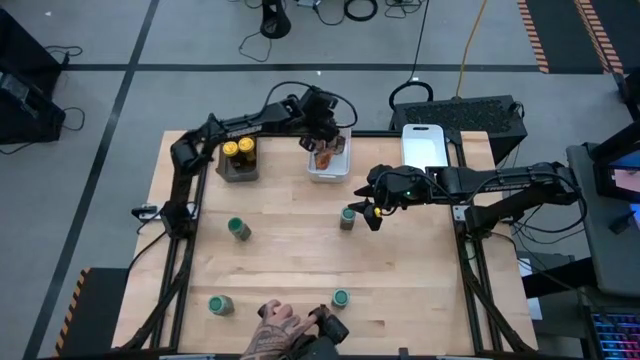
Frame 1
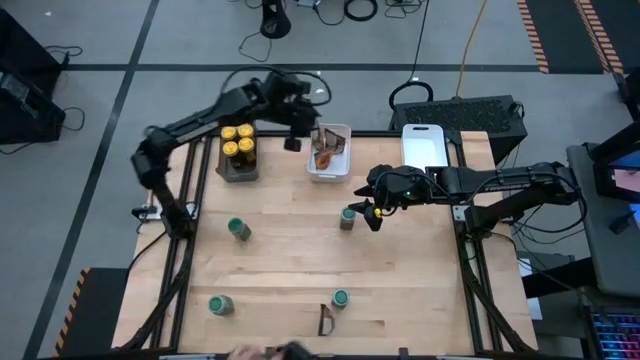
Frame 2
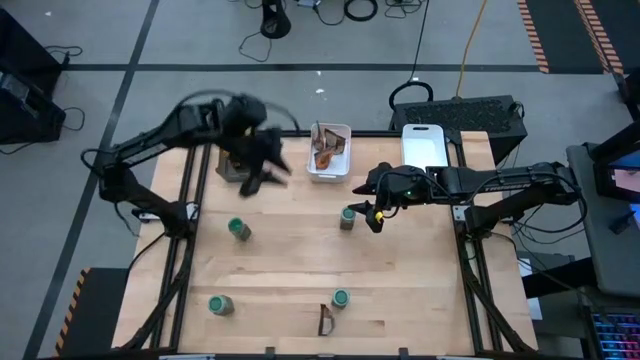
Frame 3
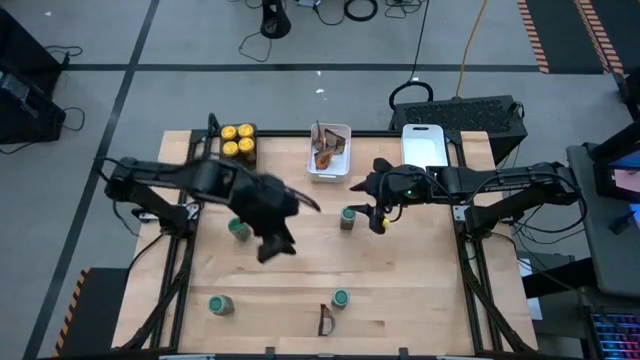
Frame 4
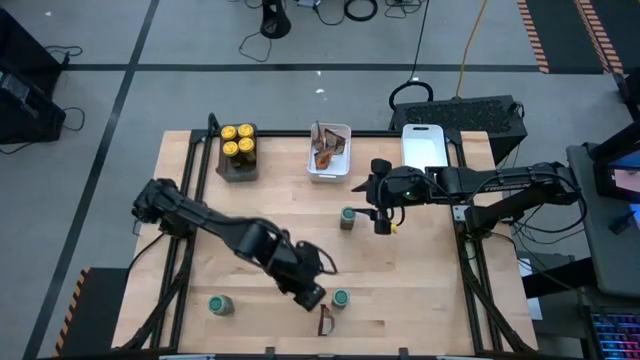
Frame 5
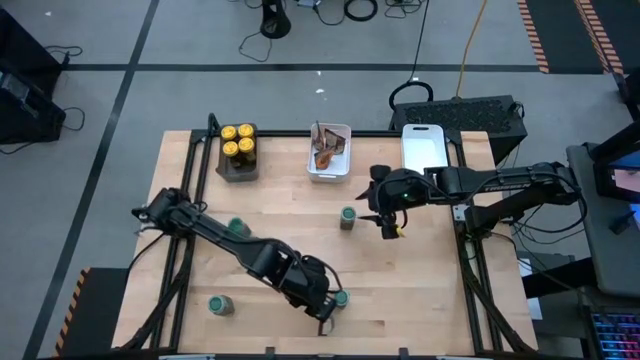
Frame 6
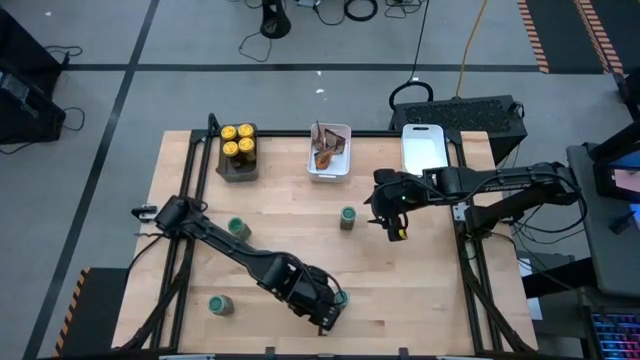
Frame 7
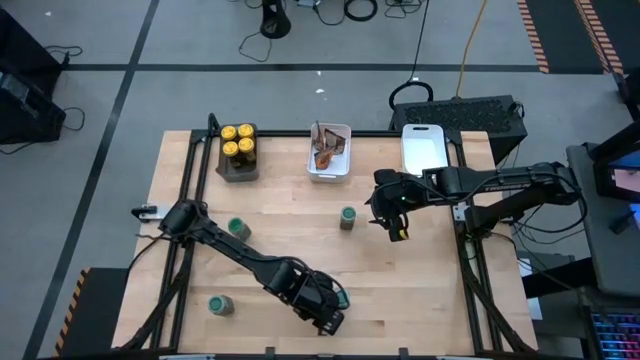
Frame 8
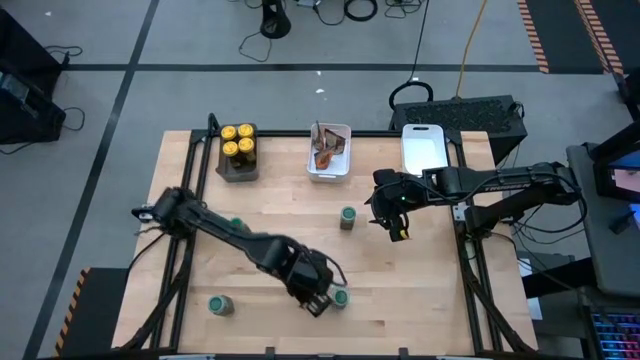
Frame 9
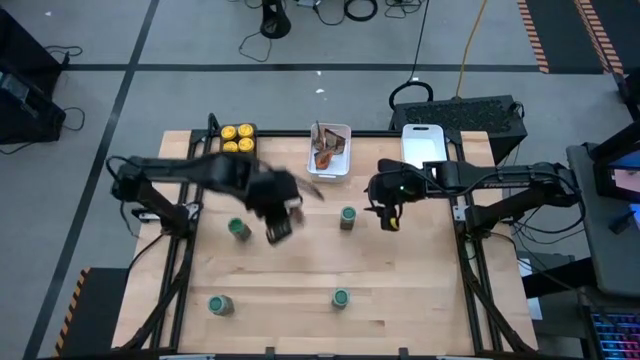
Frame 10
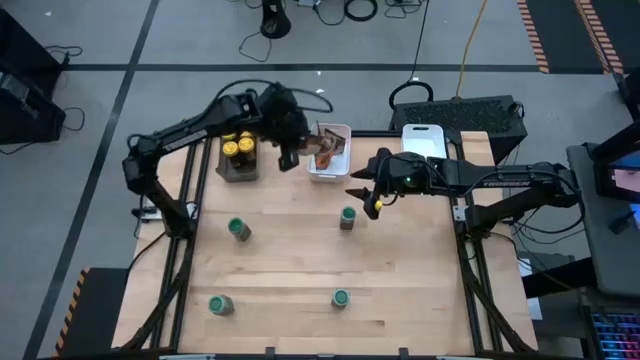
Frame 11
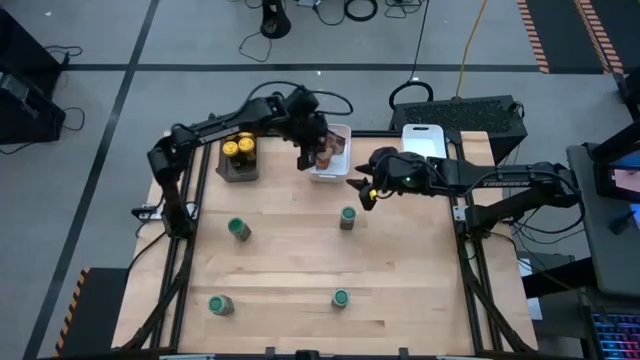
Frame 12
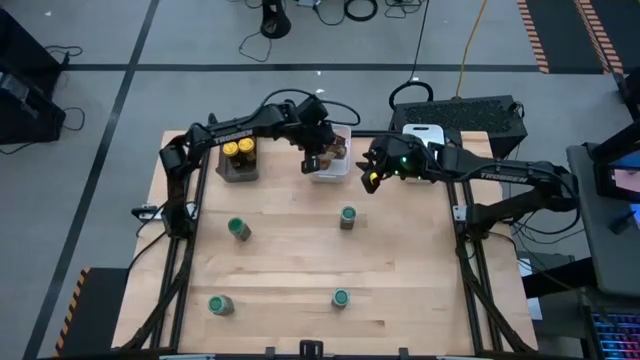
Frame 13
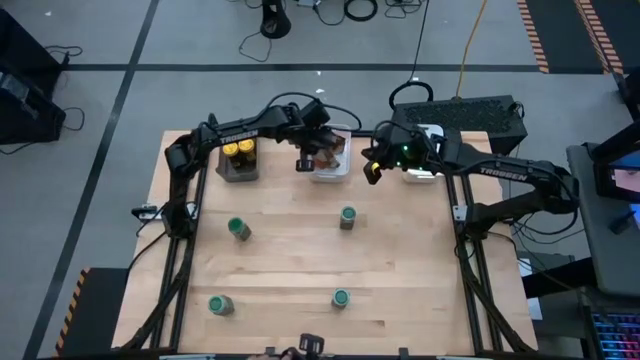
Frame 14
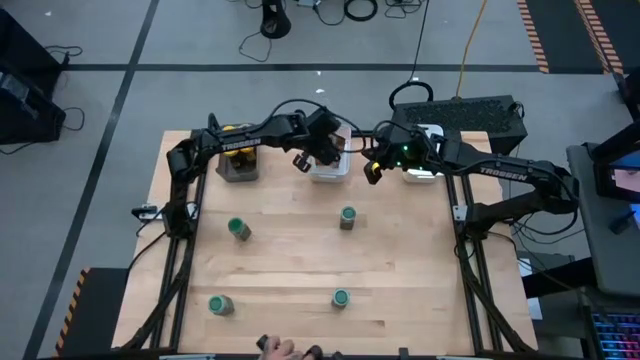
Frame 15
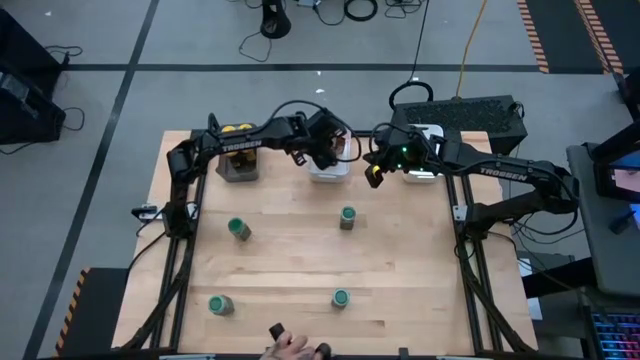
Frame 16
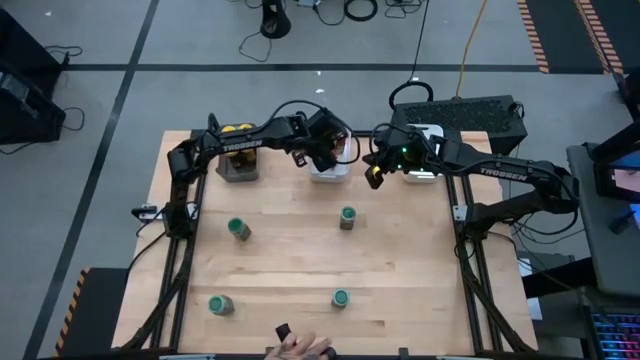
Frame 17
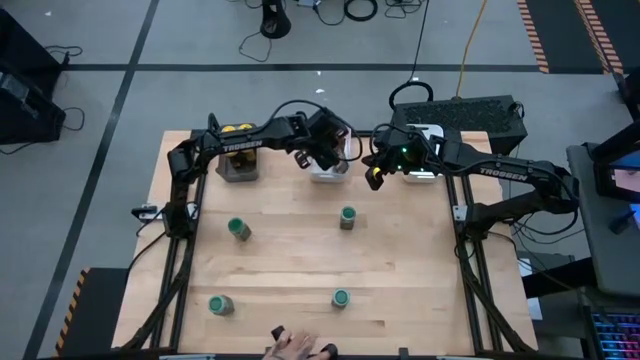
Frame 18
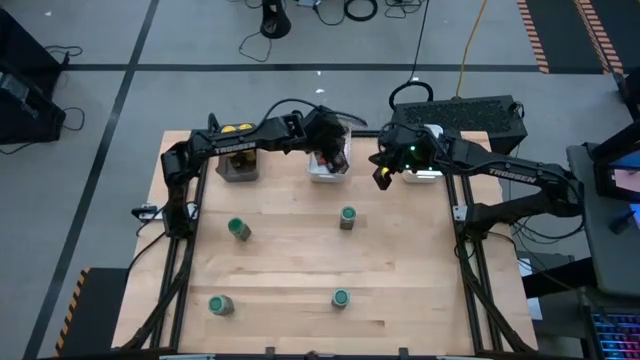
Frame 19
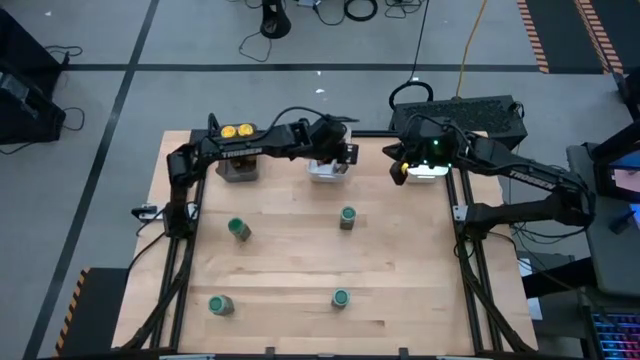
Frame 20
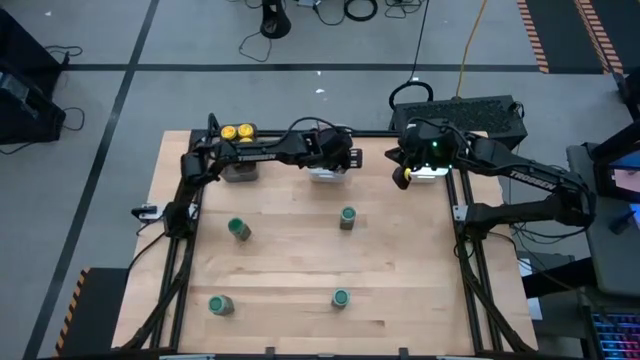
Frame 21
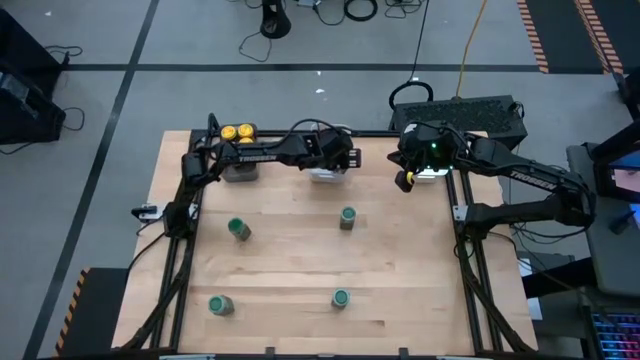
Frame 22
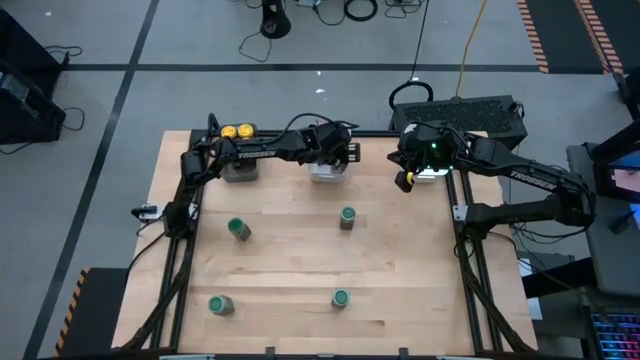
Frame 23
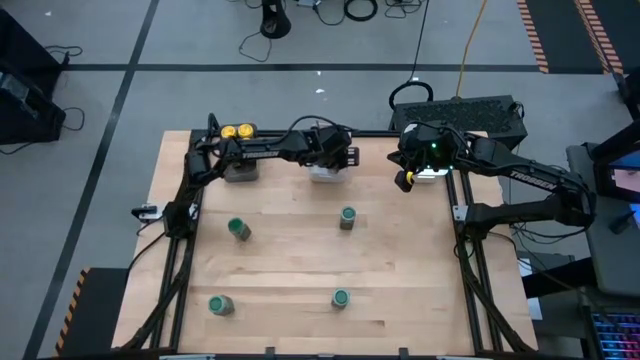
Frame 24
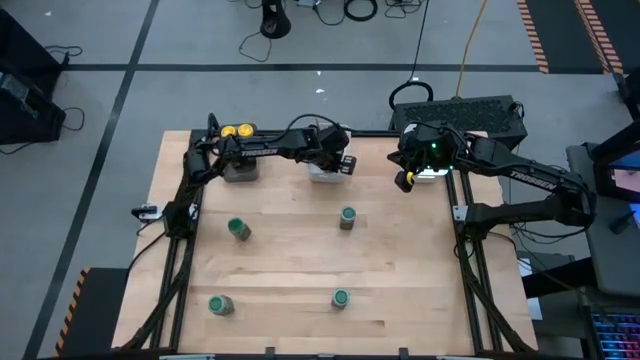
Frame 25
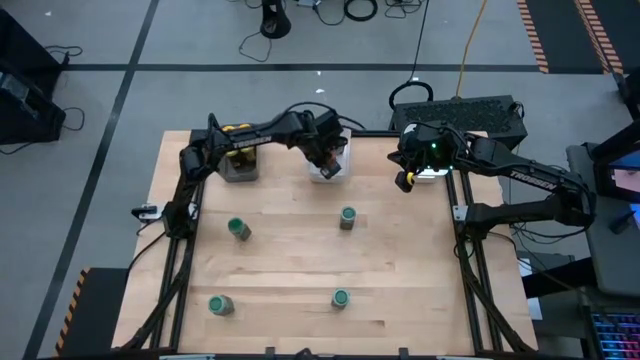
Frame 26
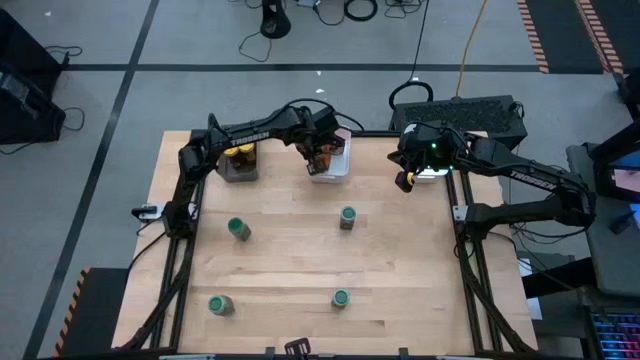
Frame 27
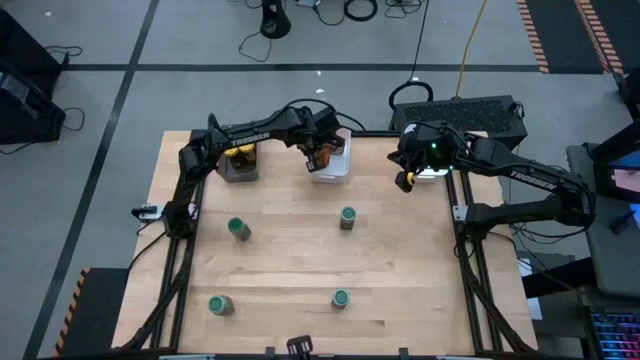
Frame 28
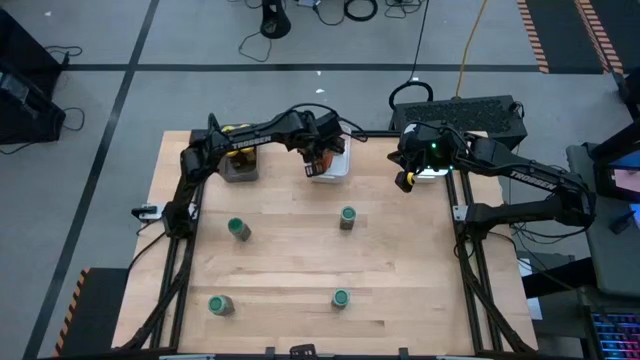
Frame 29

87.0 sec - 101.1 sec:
Task: Sort spices by type
Put the orange seasoning pack into the left white bin

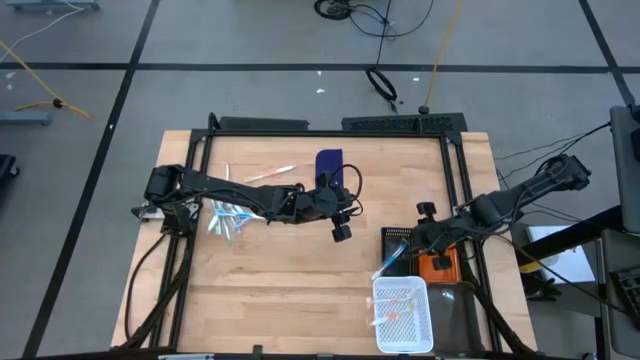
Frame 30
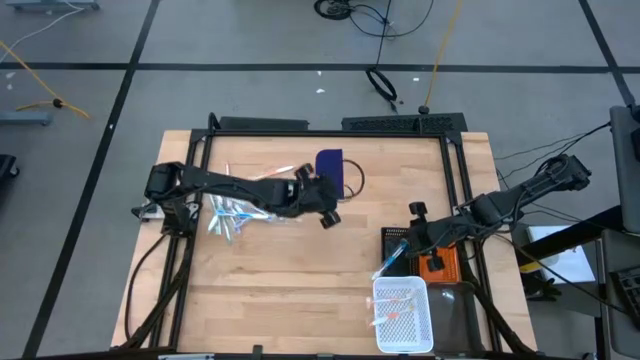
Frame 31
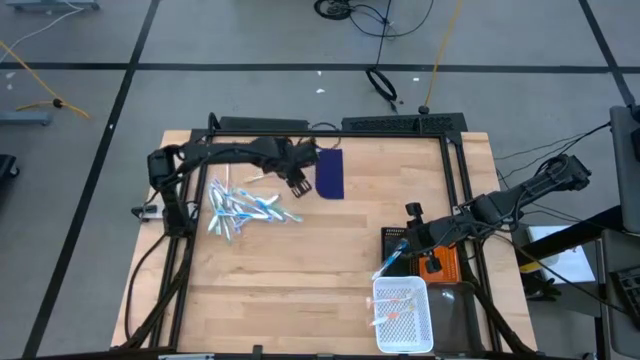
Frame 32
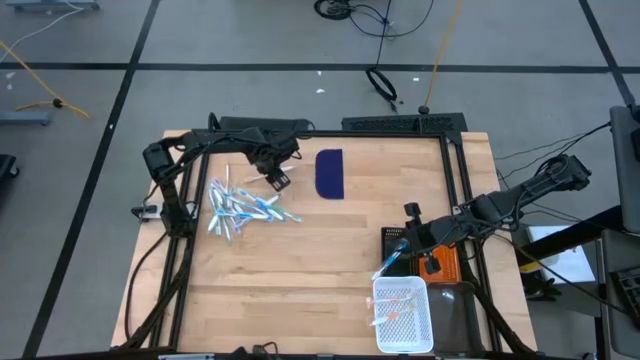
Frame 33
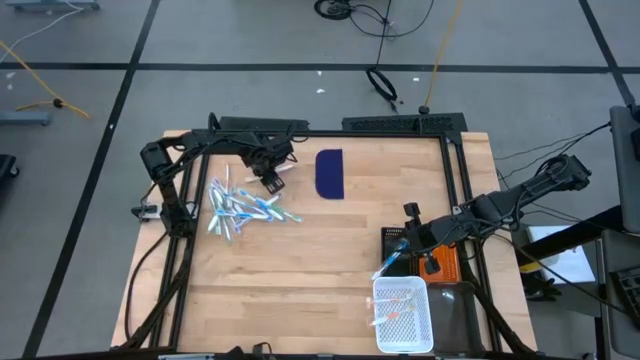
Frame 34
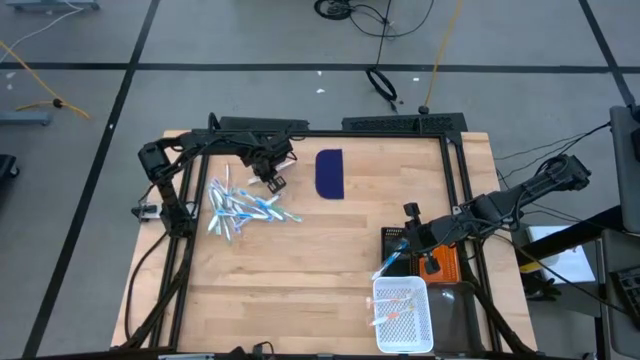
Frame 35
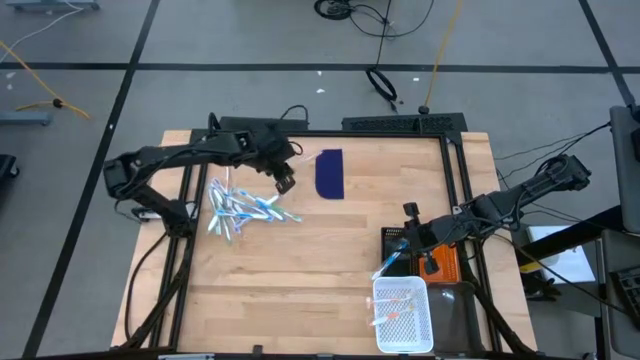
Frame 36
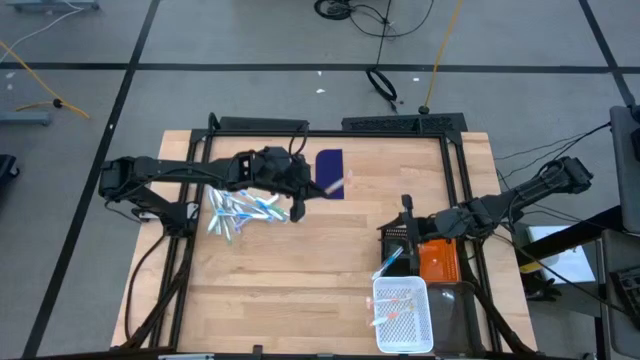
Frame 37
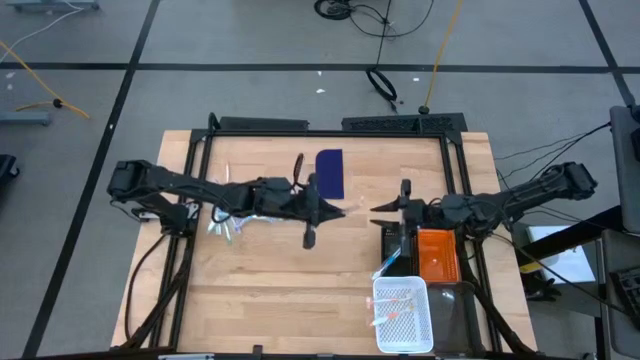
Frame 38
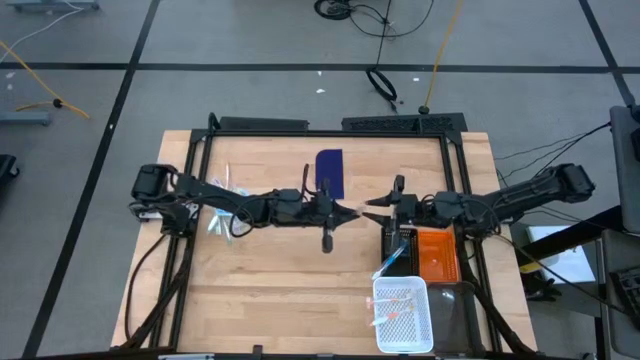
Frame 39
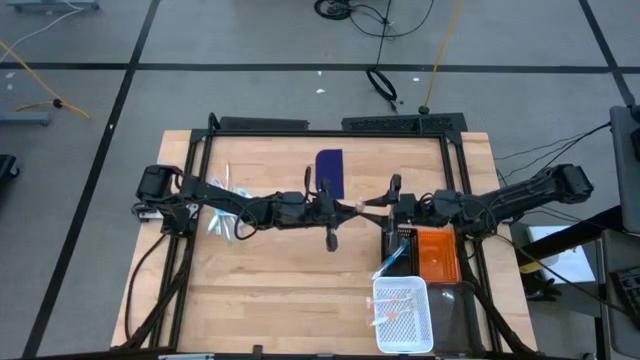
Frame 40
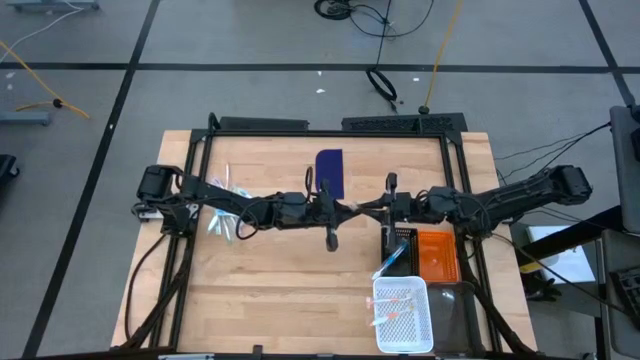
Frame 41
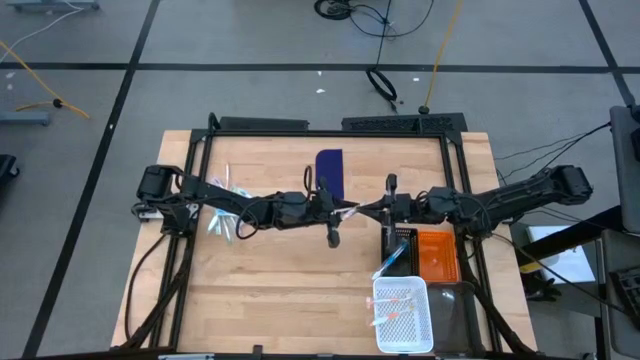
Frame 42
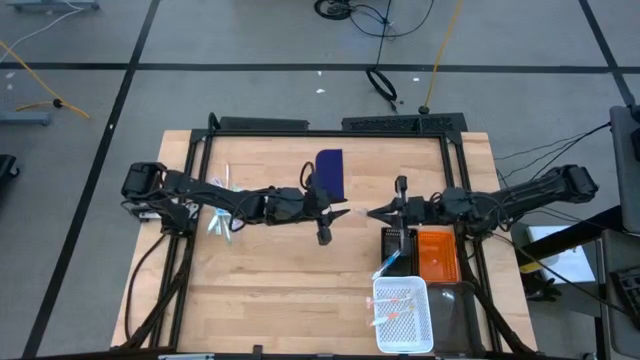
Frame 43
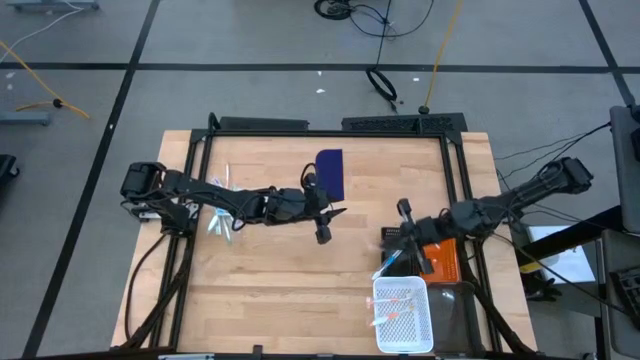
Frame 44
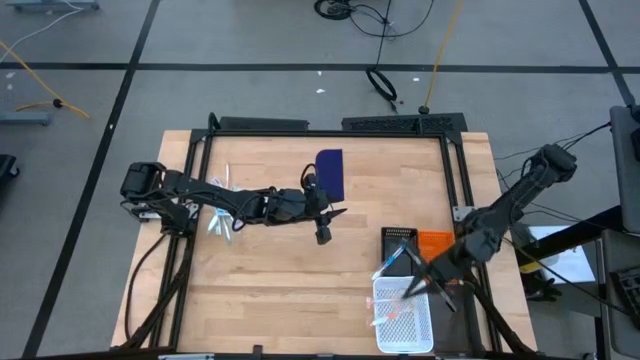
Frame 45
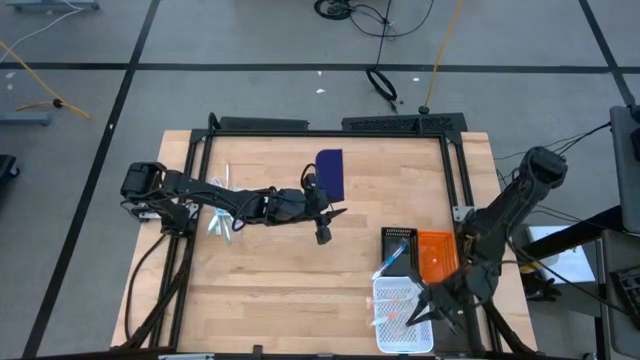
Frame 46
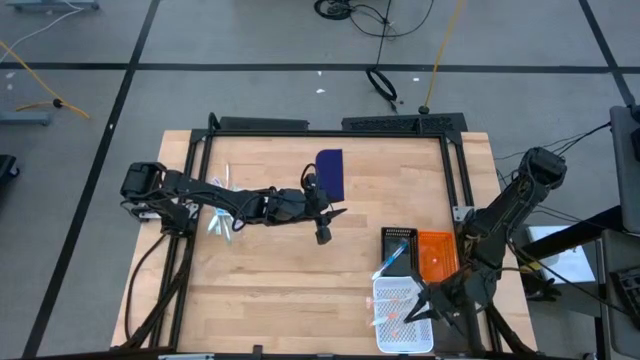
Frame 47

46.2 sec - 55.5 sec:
Task: Pick & Place Toothbrushes
Put the orange toothbrush into the white bin
